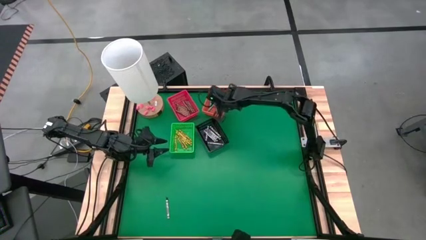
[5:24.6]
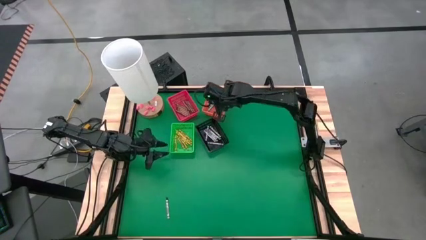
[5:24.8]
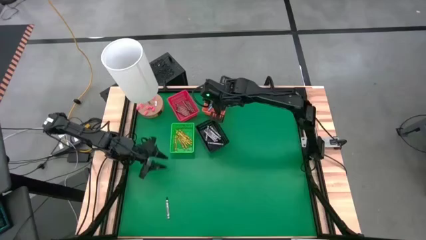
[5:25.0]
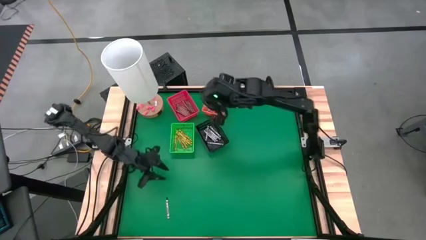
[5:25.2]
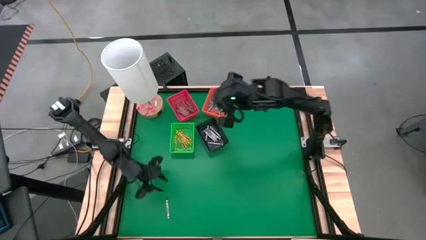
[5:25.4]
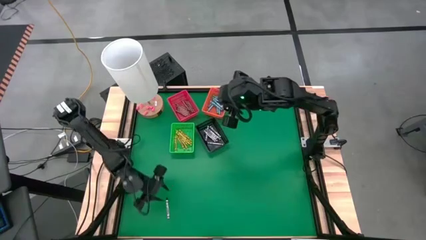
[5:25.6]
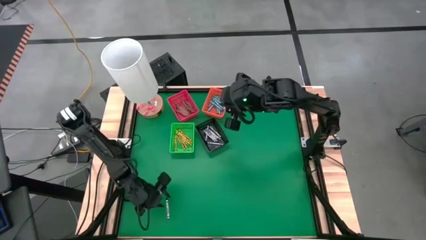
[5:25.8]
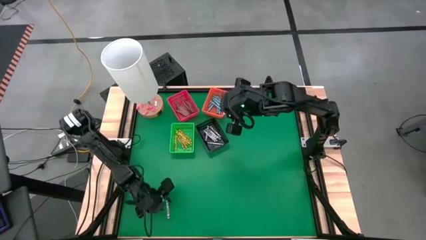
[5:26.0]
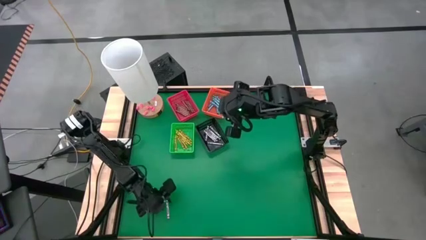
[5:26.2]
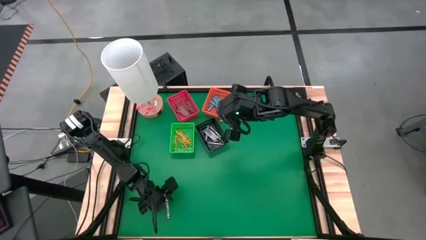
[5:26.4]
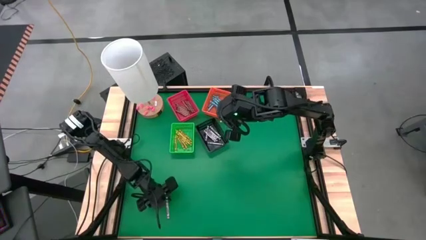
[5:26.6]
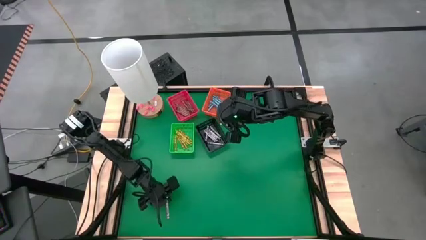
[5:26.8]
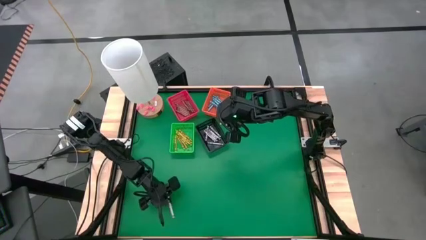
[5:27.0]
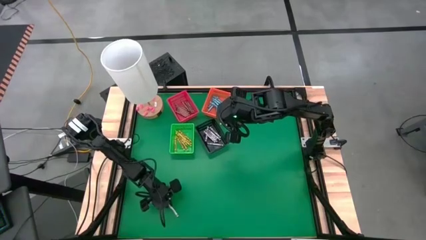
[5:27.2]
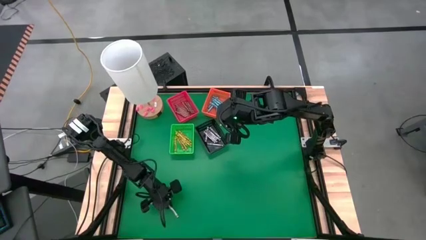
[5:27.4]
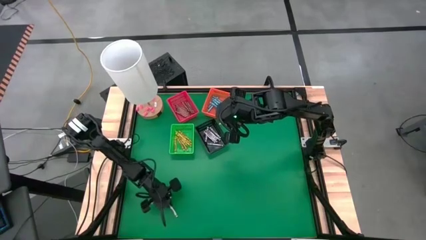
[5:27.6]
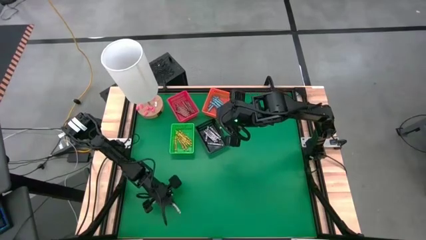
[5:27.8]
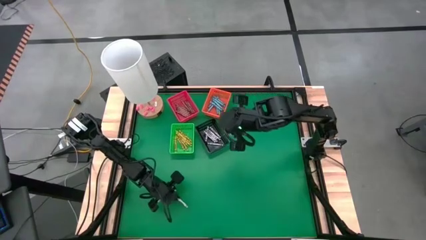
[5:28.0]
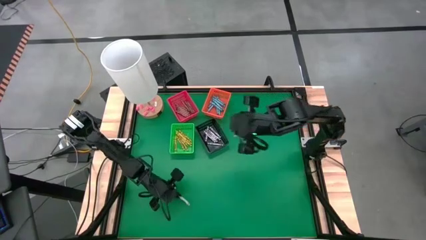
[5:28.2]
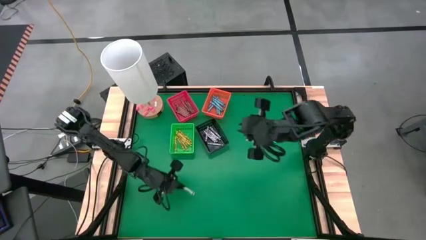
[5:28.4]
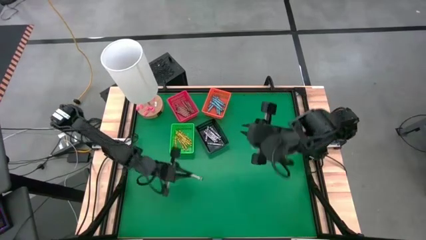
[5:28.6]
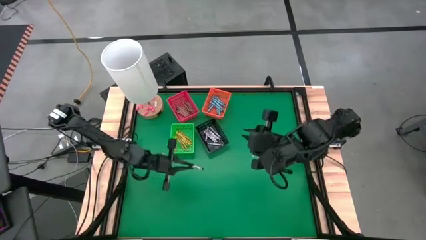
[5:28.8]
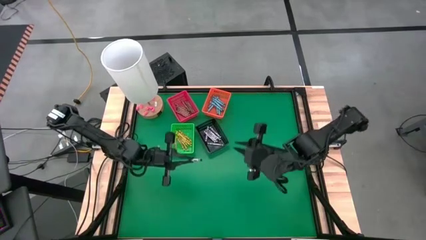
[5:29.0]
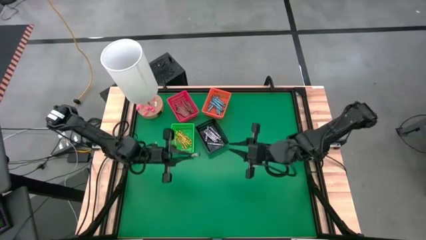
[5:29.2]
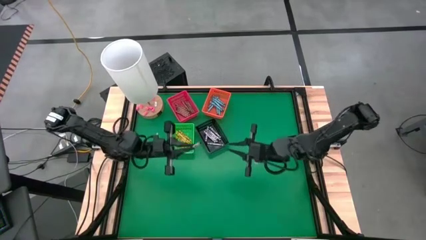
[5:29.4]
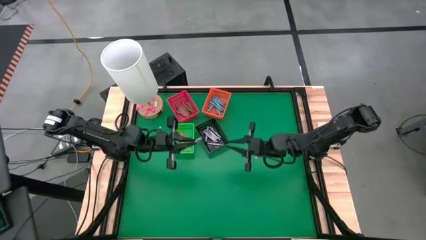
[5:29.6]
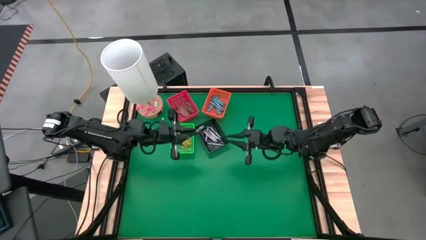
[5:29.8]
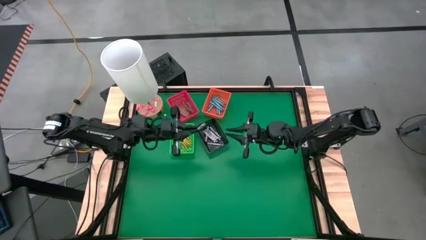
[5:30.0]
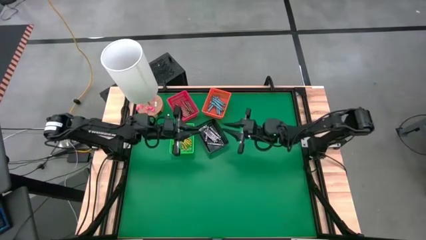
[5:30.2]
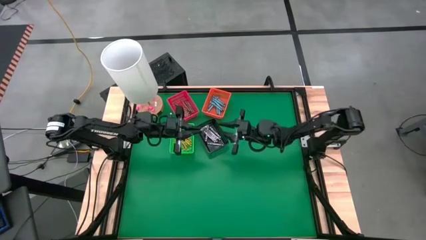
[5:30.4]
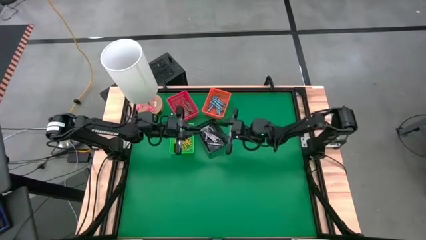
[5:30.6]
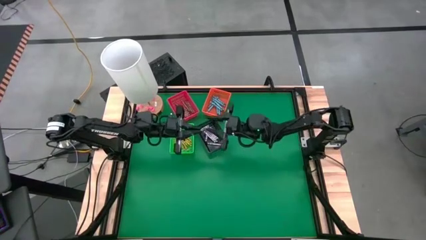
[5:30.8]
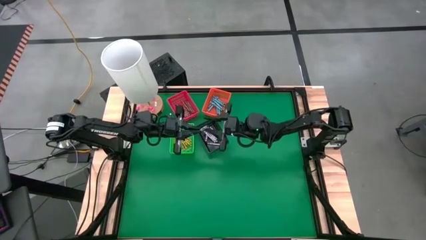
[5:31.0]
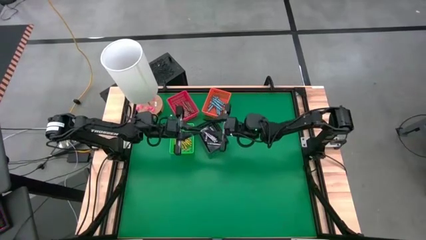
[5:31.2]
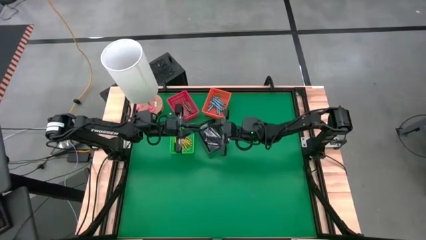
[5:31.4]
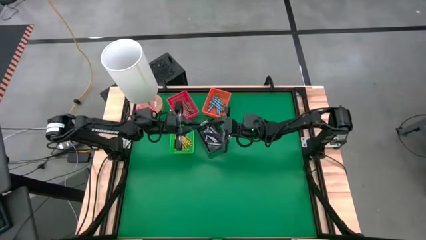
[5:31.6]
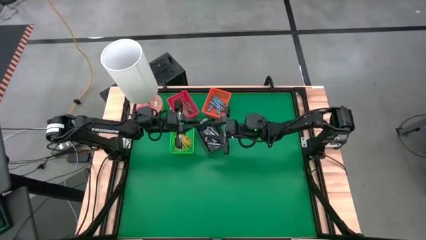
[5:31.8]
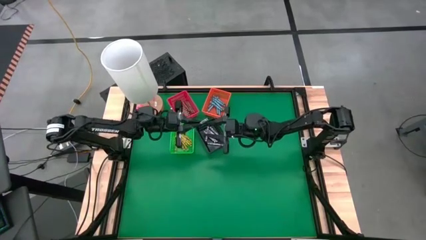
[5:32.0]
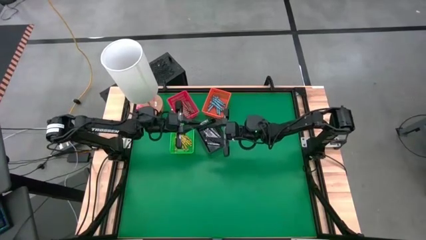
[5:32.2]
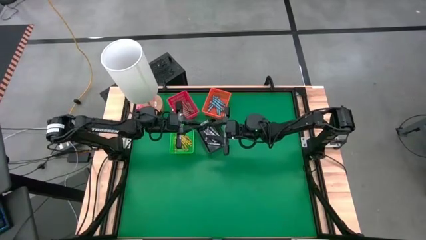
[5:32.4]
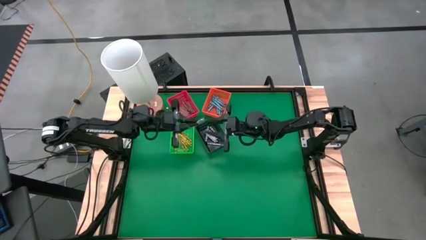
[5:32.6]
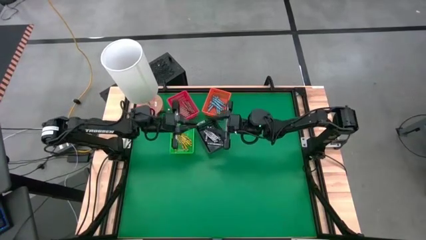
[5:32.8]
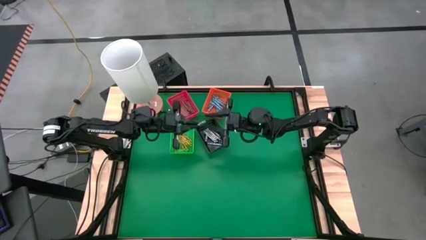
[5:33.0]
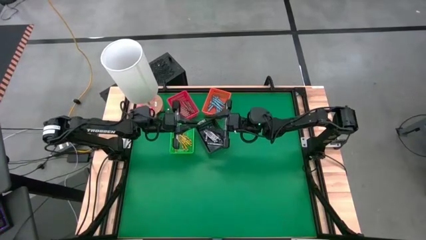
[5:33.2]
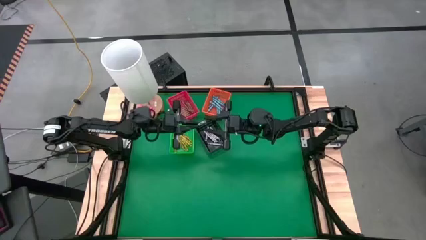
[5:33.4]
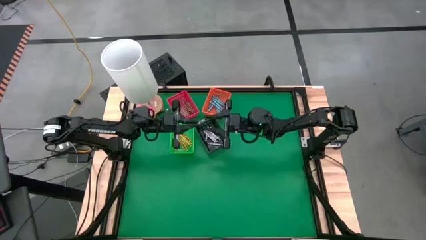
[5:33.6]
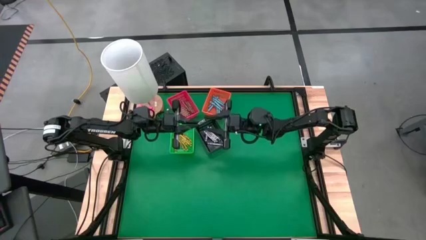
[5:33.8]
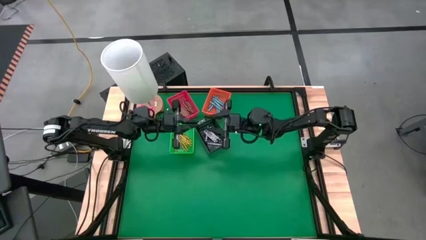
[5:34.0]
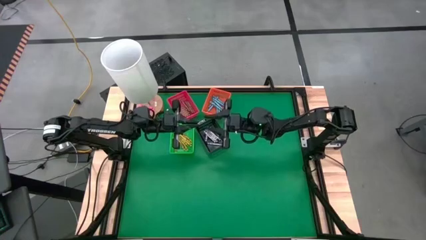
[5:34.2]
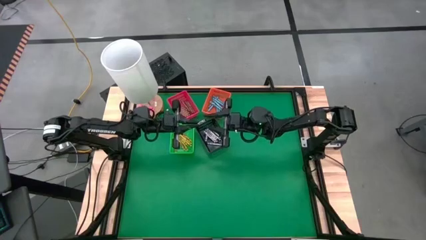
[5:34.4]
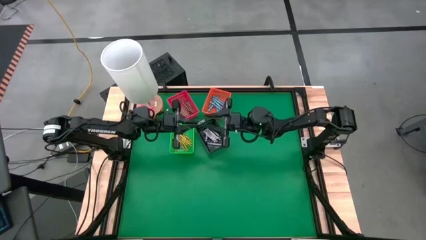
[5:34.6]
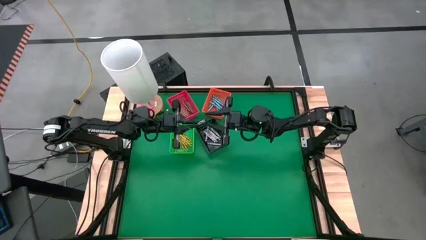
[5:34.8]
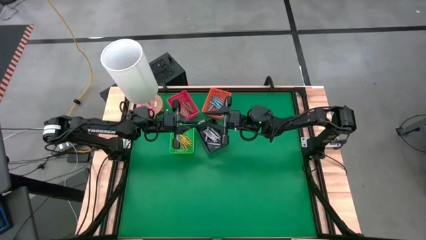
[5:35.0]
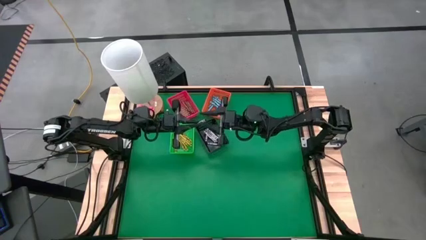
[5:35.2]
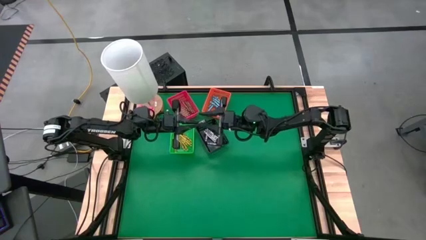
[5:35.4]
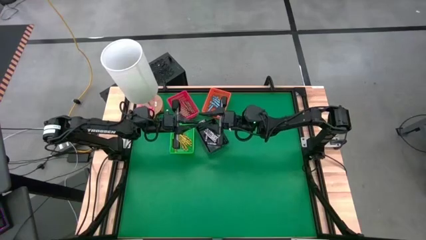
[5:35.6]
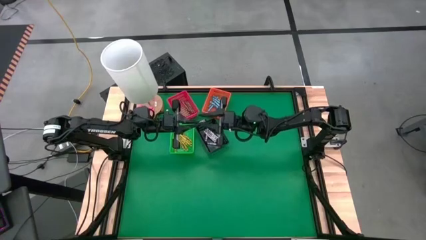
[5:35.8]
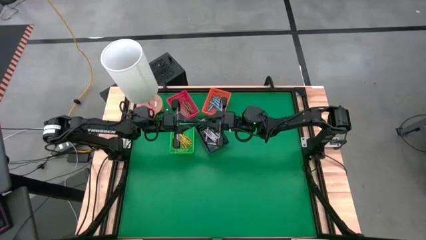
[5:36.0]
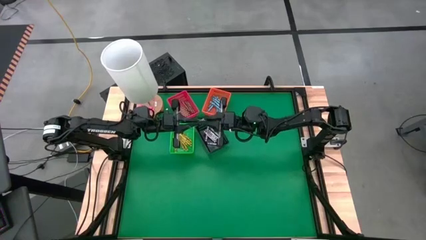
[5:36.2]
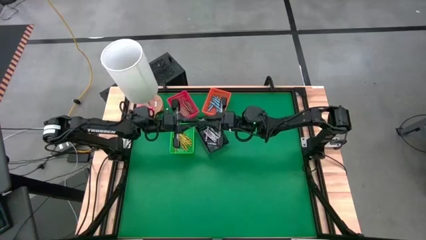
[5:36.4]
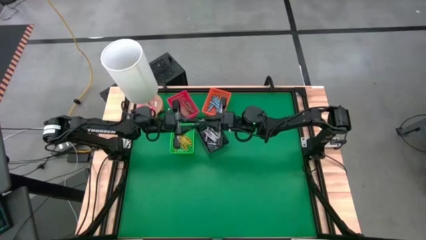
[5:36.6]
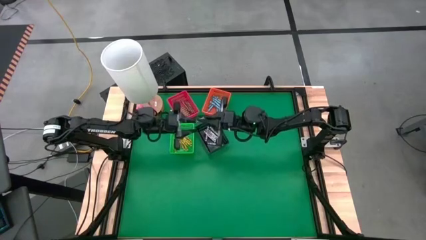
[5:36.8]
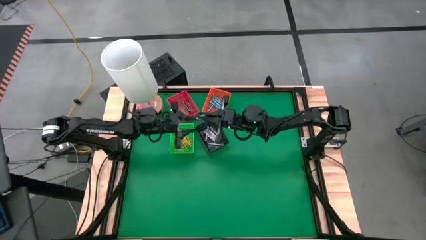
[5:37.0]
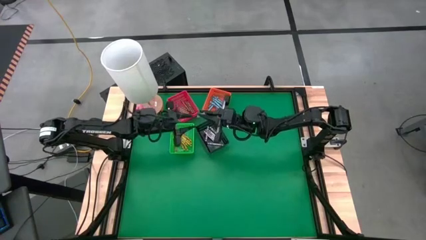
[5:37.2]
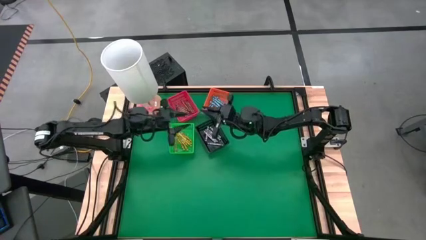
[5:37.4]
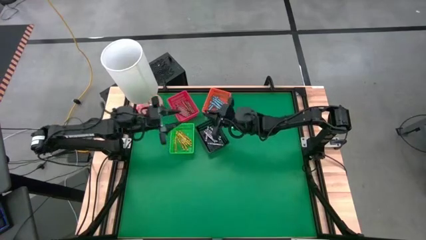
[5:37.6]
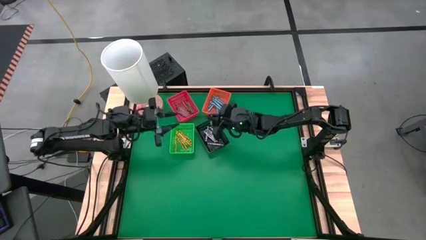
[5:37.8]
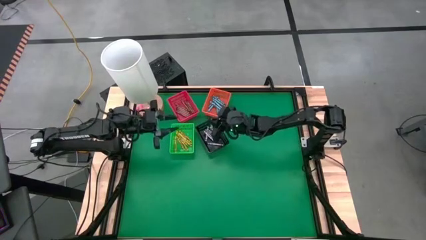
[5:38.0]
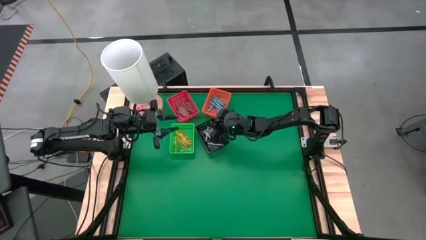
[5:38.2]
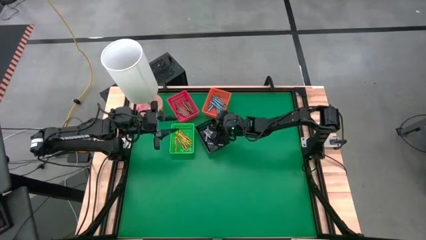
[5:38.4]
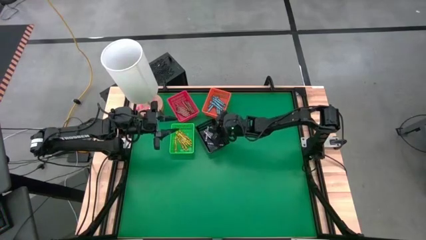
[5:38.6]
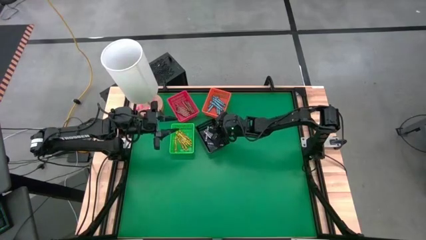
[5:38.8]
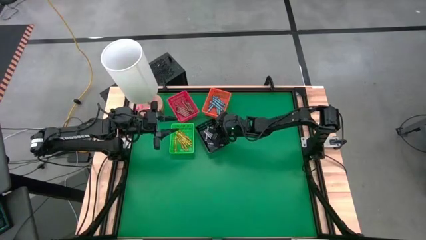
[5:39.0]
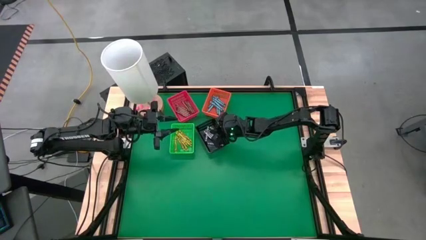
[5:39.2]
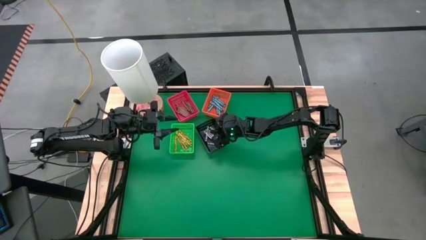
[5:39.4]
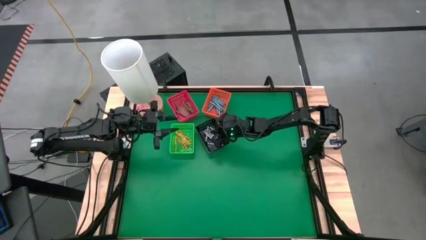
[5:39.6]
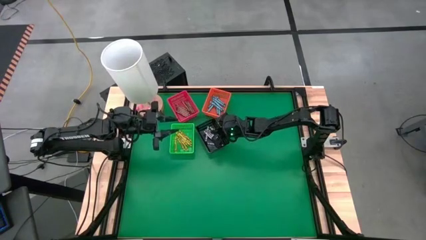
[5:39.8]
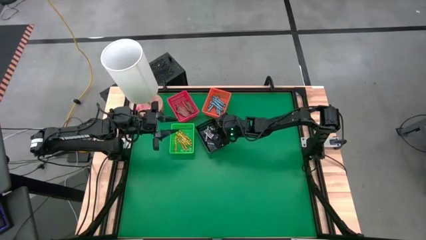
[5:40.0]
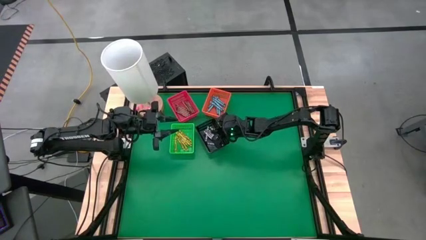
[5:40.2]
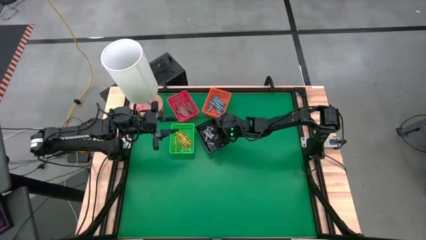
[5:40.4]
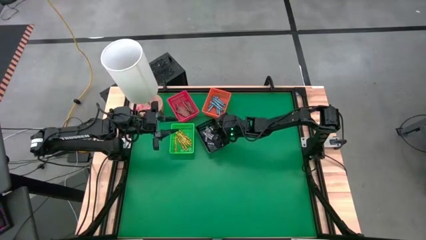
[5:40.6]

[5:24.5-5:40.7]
Task: Sort crayons
Put the black crayon into the black bin
